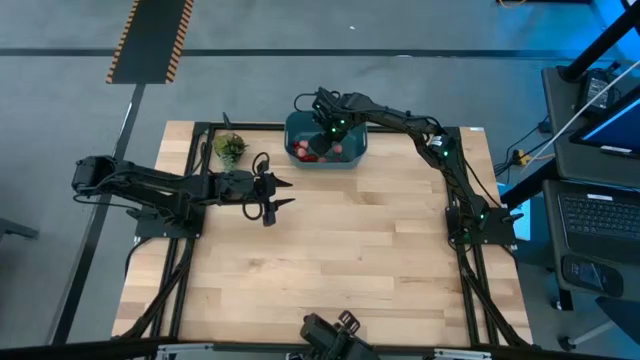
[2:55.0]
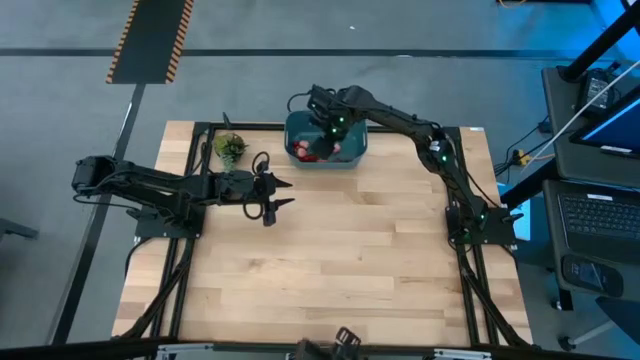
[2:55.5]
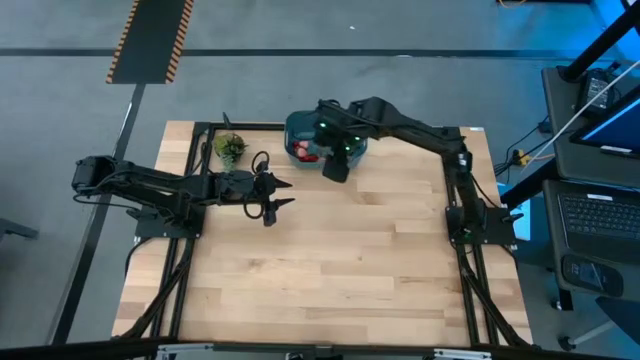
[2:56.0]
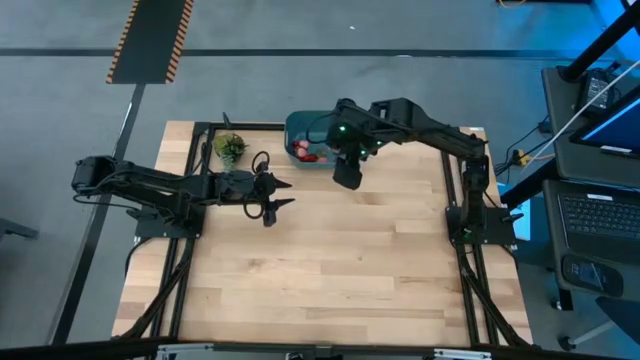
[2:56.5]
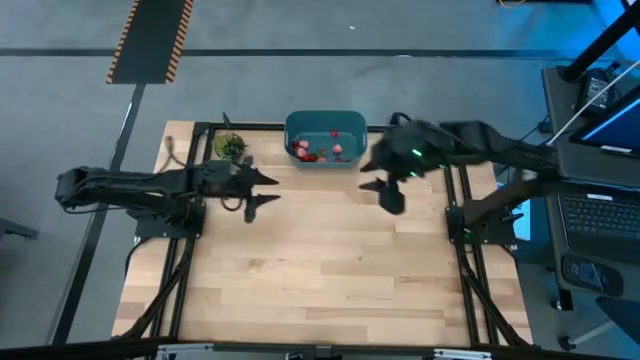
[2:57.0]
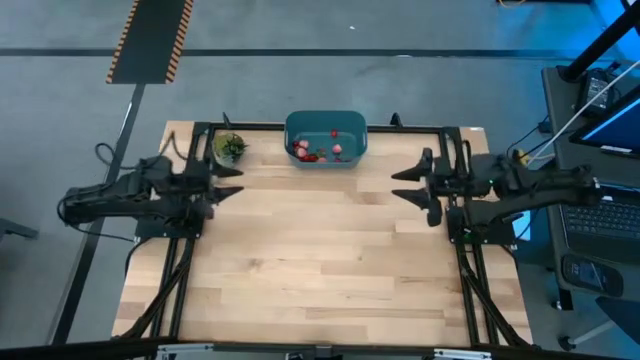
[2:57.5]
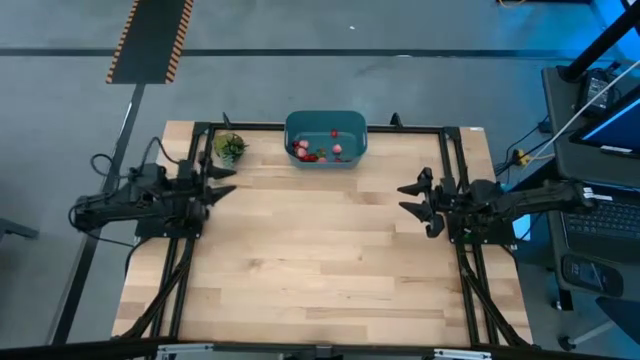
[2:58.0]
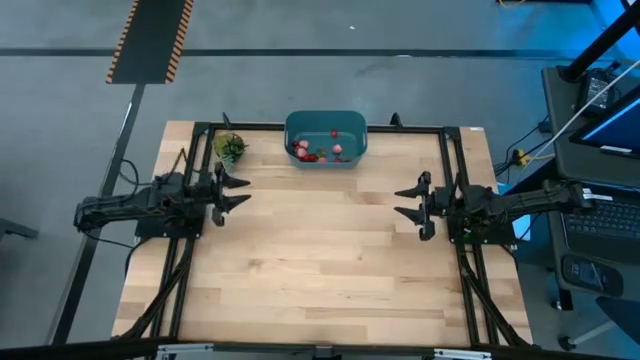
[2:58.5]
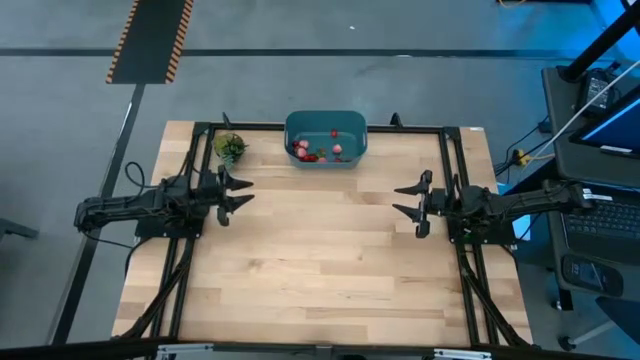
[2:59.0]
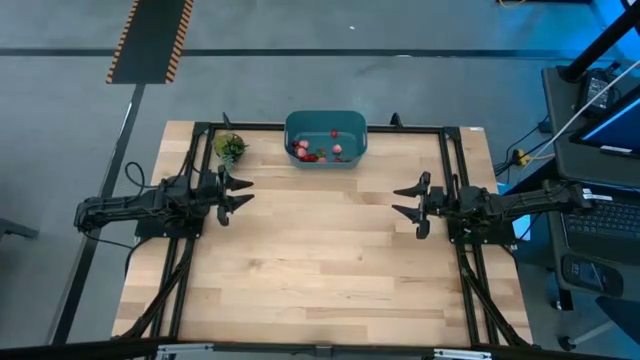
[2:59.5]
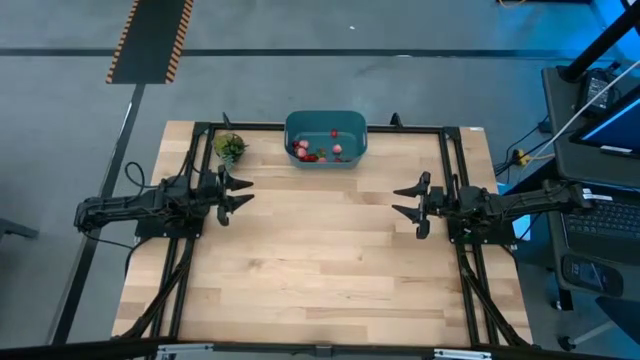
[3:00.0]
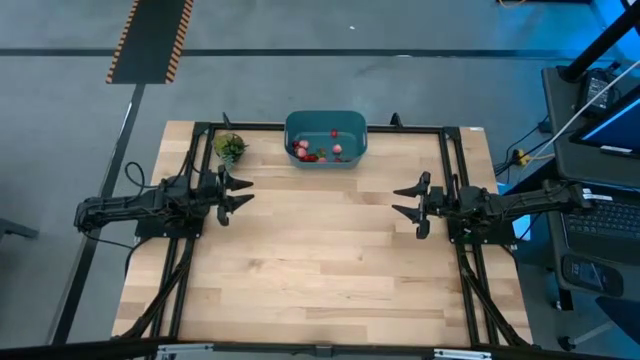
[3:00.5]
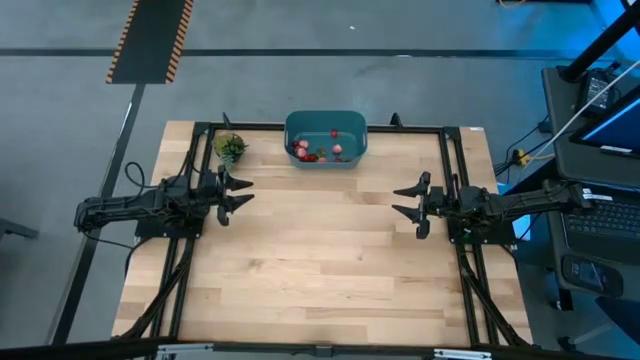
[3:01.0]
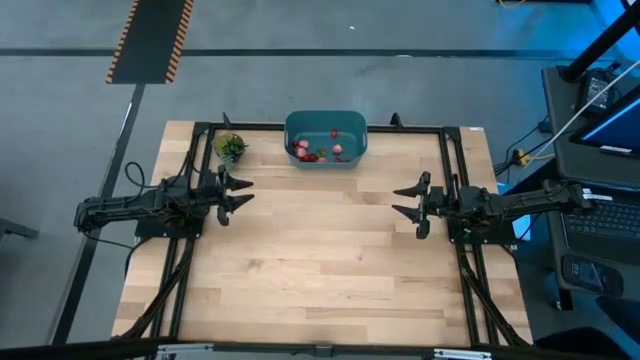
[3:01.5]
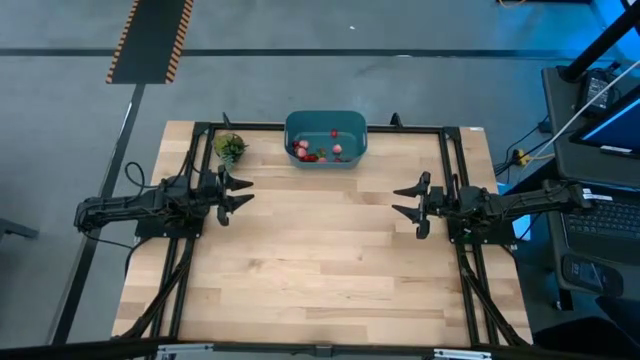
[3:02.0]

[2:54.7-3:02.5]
Task: Pick and placing Produce into tupperware
Return to Home Position

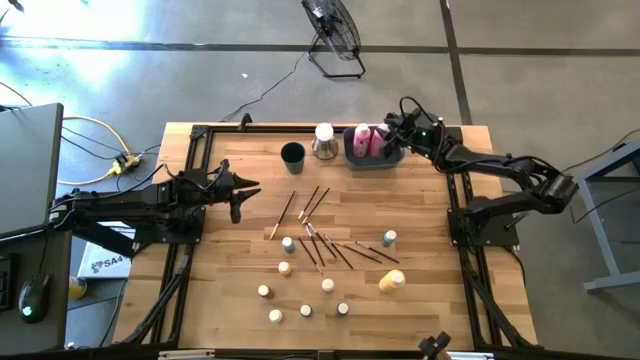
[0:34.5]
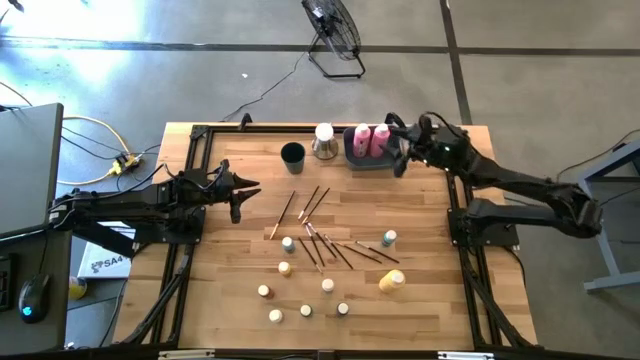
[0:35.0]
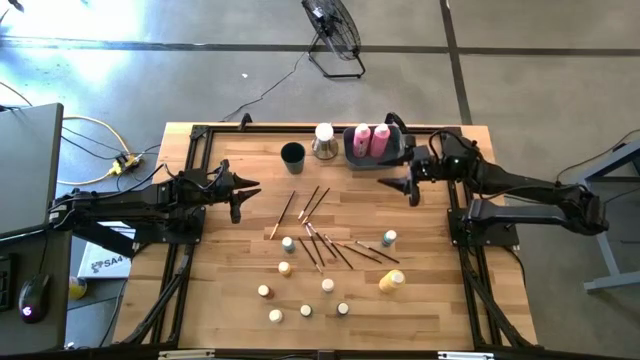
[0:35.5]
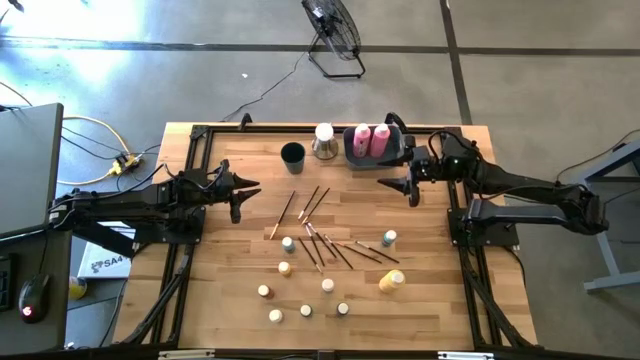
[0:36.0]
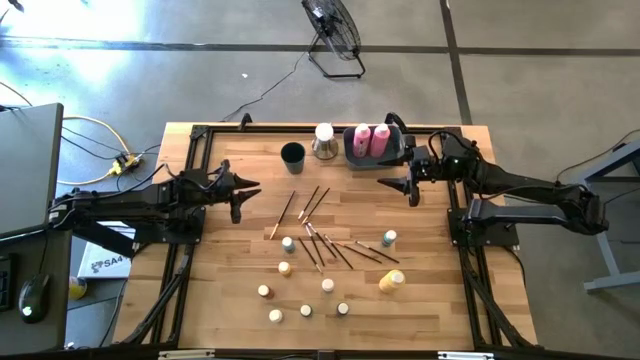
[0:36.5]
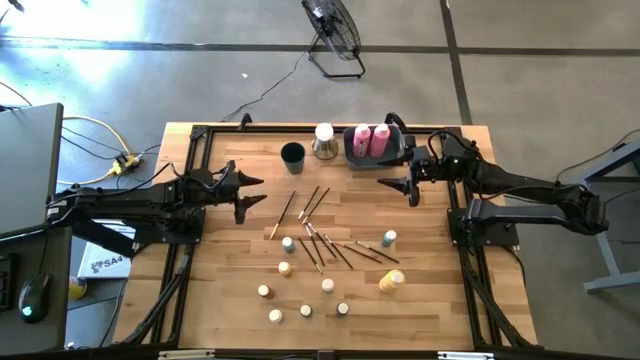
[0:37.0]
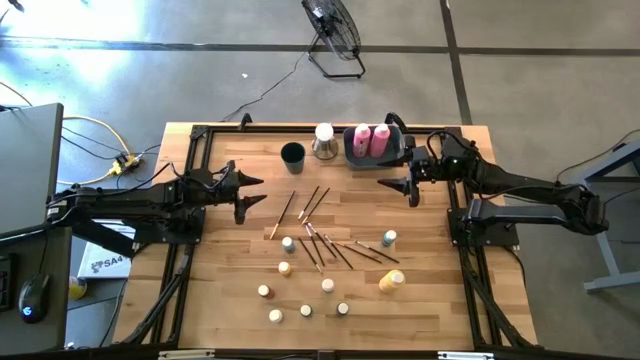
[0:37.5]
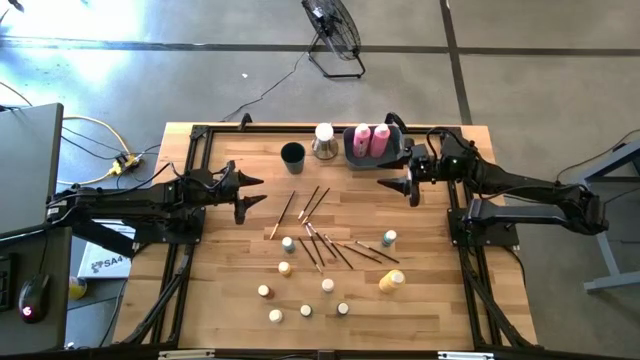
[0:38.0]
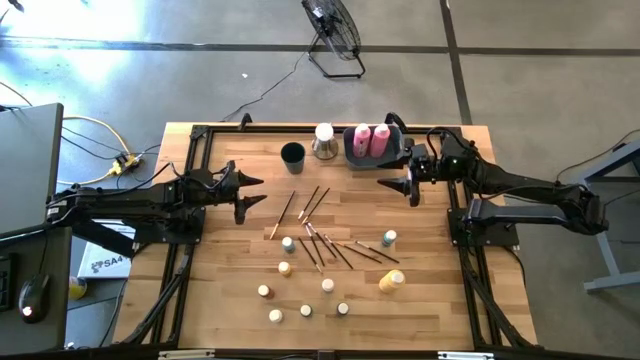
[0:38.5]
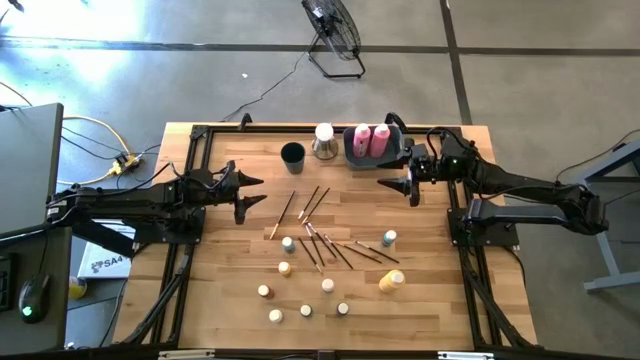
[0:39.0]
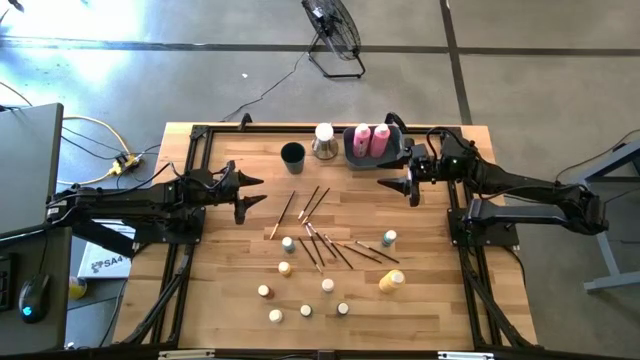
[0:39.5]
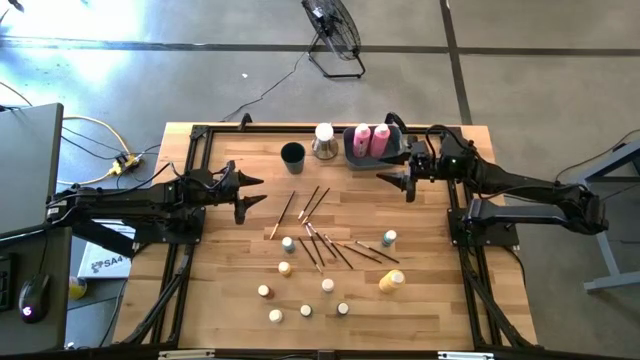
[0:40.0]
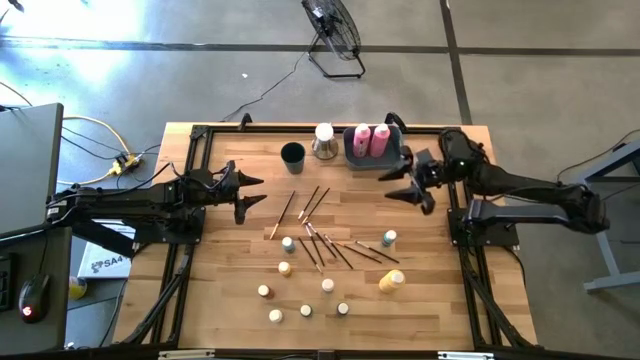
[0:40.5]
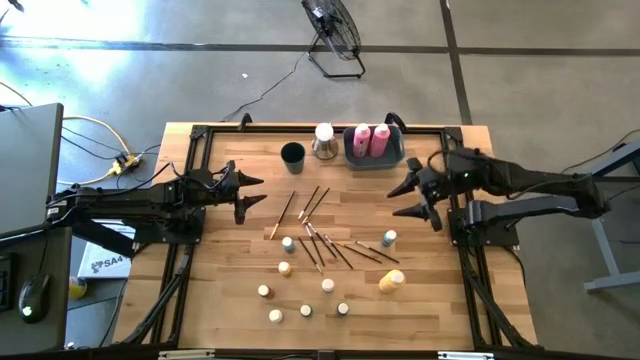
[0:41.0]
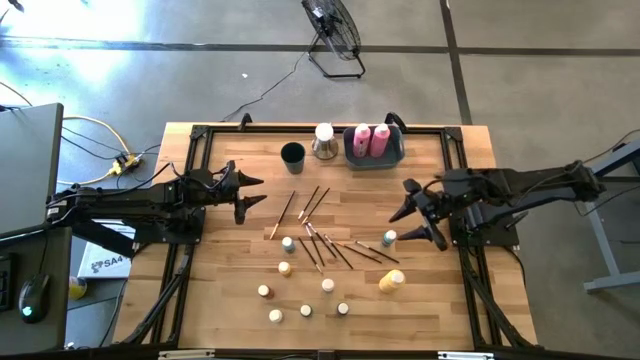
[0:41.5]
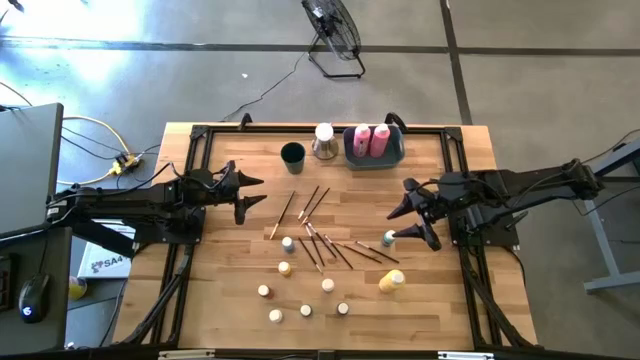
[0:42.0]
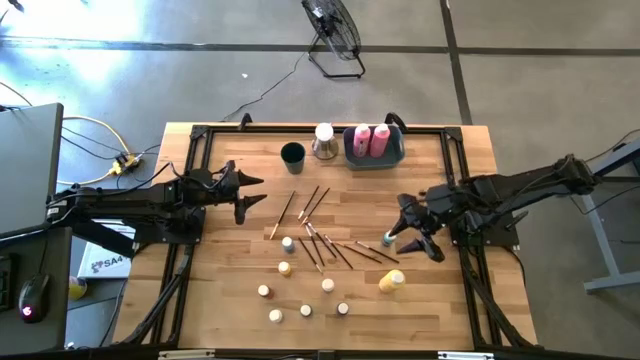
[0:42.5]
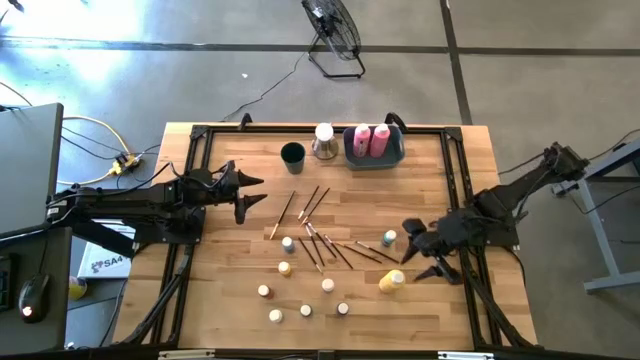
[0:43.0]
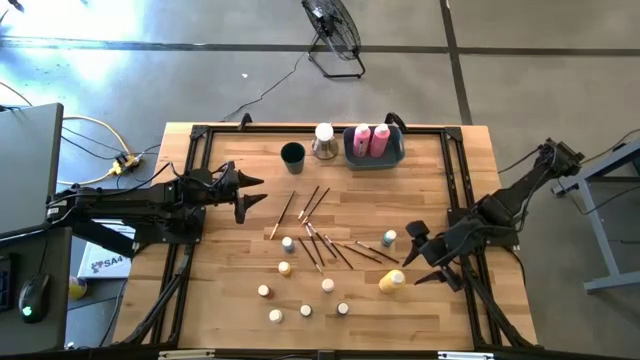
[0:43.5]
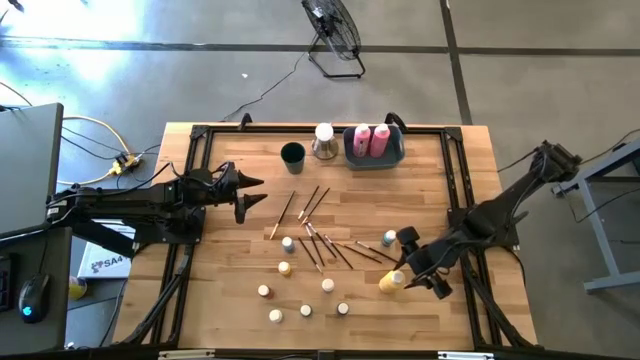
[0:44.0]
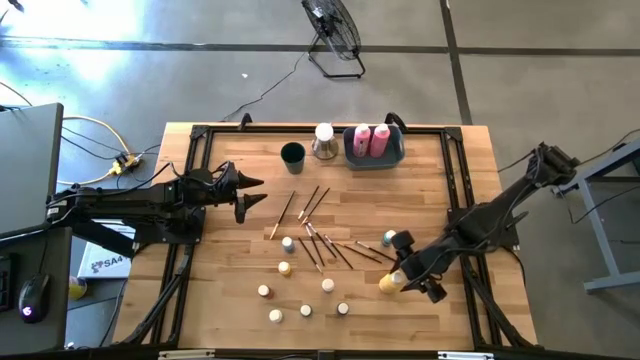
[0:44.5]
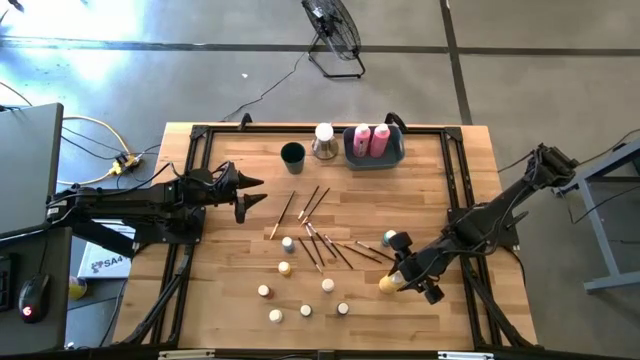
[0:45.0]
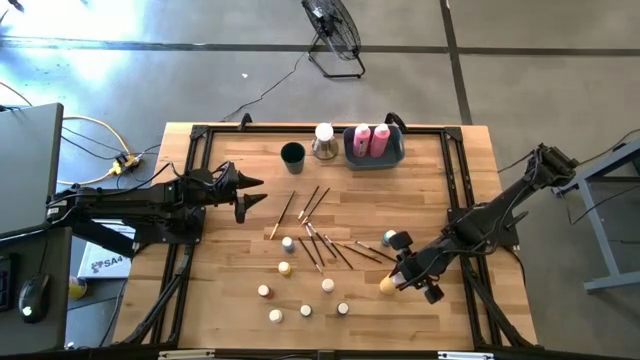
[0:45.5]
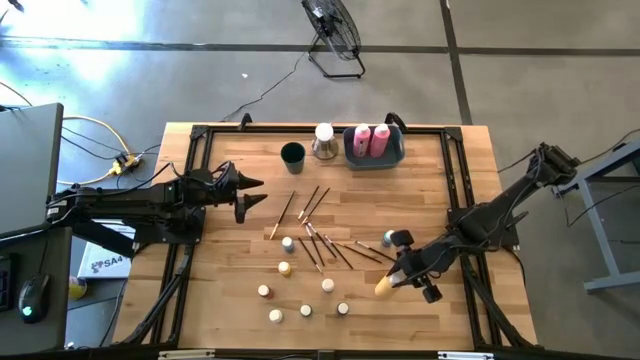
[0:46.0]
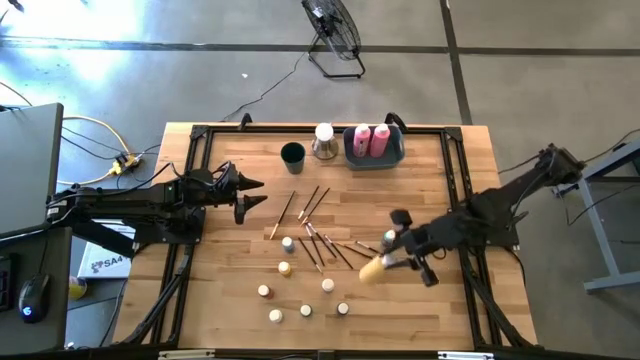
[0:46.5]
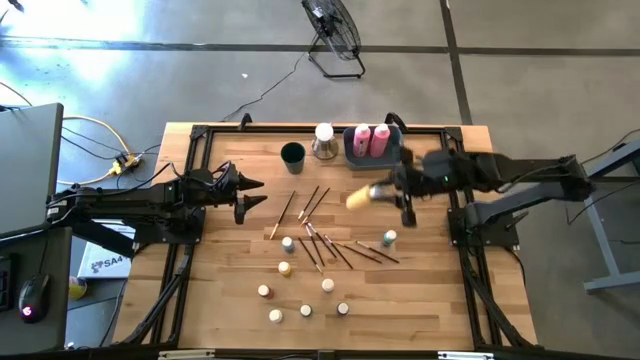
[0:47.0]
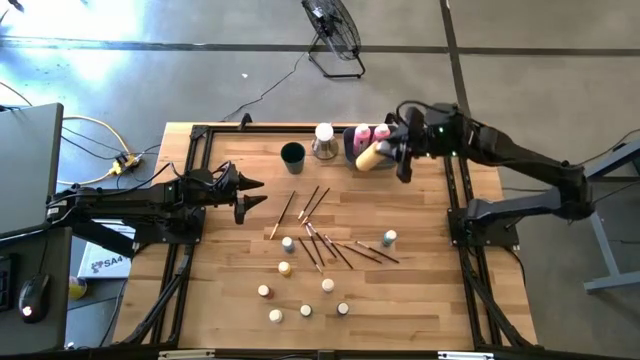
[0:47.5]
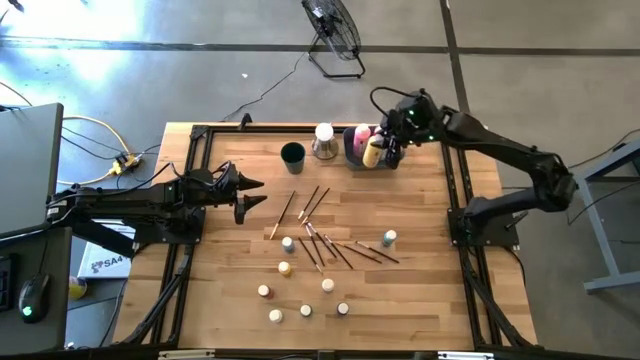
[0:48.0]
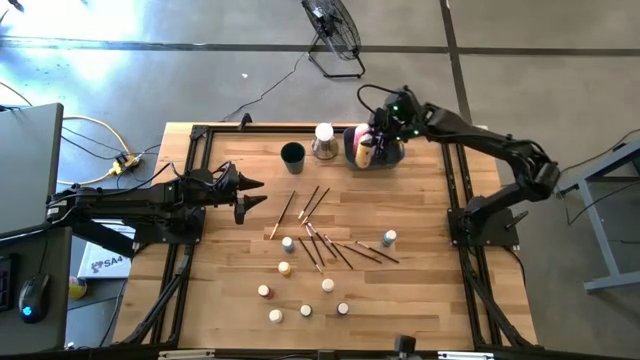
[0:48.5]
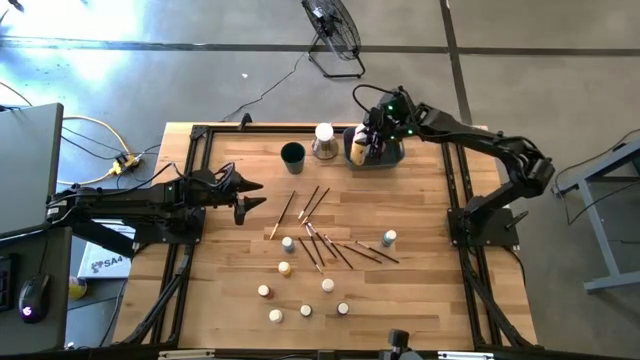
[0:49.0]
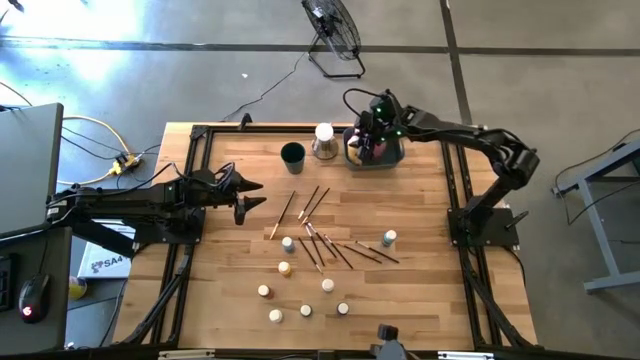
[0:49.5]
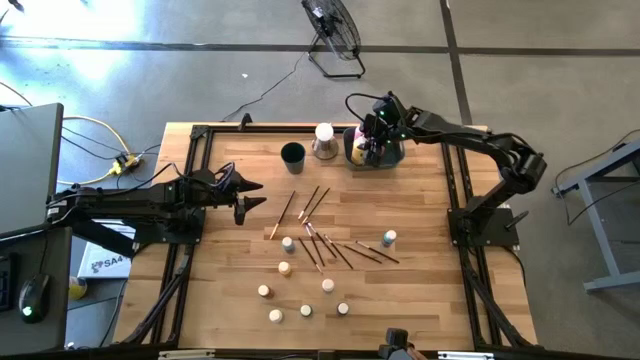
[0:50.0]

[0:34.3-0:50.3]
Task: Pick & Place Paint Supplies
Put the large yellow paint bottle into the blue bin
